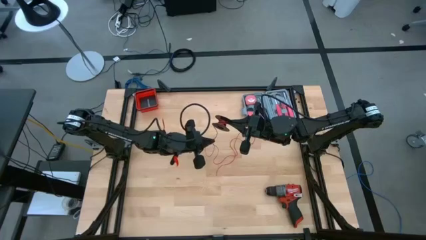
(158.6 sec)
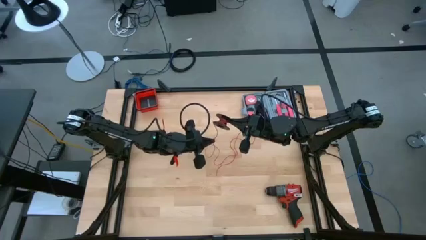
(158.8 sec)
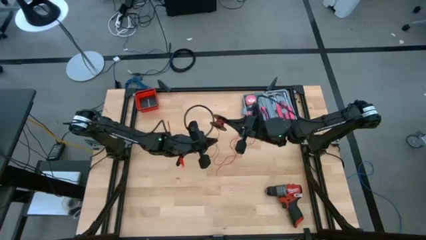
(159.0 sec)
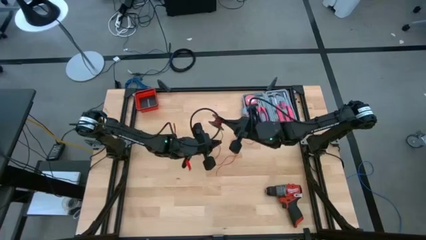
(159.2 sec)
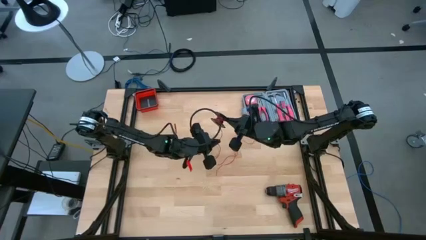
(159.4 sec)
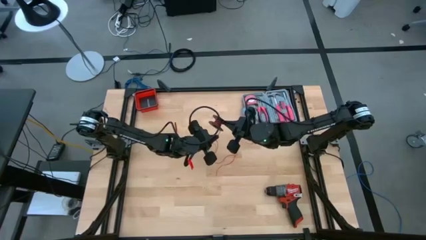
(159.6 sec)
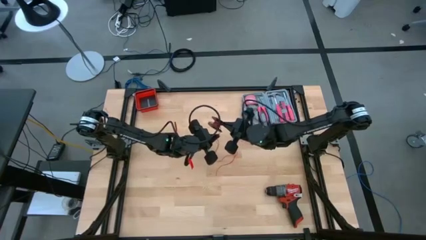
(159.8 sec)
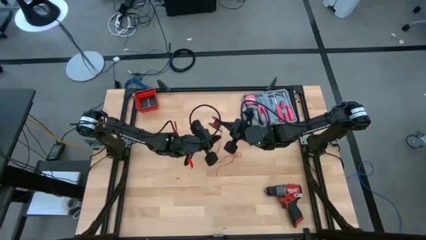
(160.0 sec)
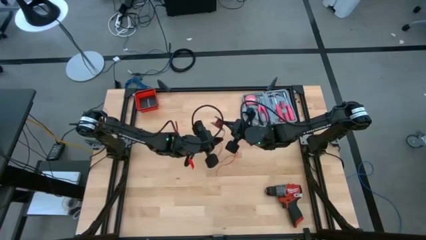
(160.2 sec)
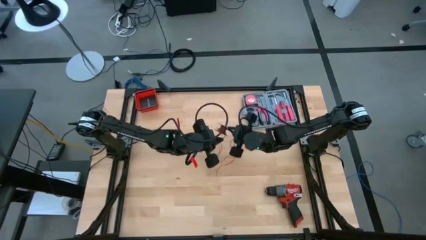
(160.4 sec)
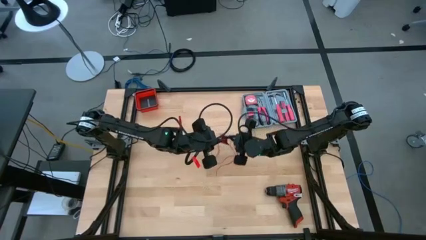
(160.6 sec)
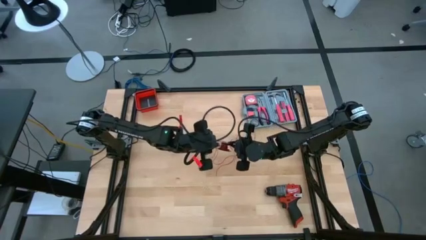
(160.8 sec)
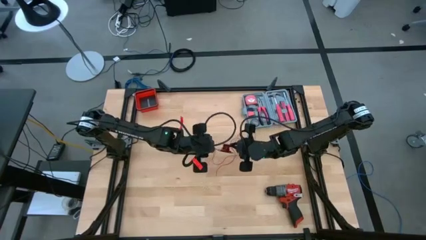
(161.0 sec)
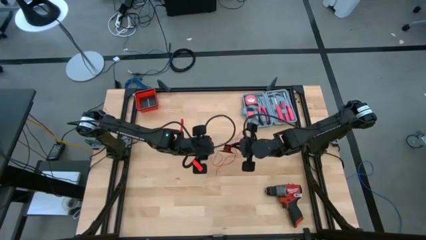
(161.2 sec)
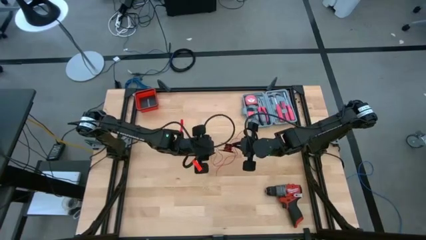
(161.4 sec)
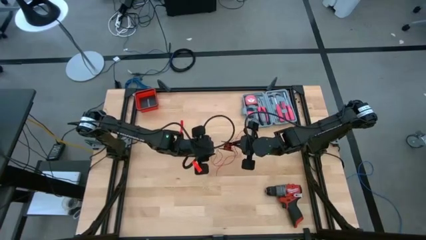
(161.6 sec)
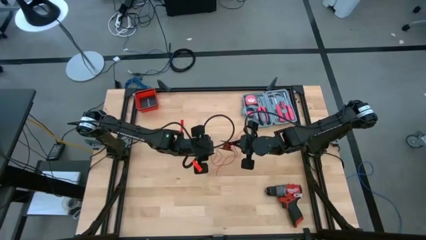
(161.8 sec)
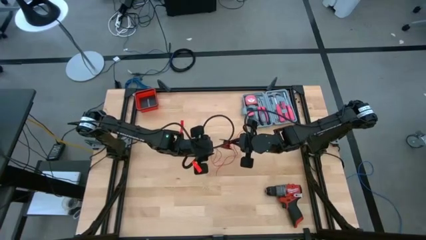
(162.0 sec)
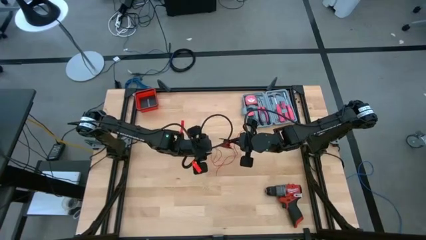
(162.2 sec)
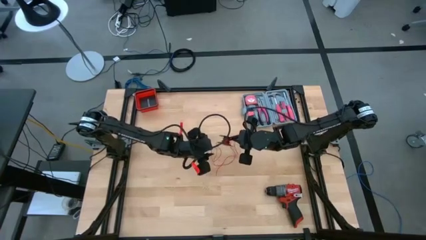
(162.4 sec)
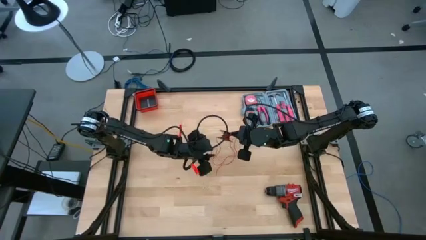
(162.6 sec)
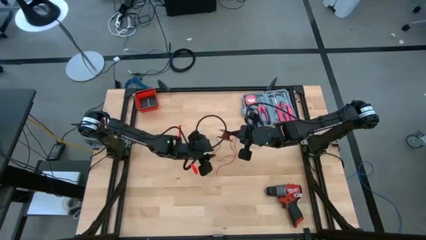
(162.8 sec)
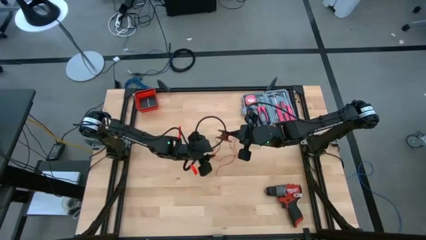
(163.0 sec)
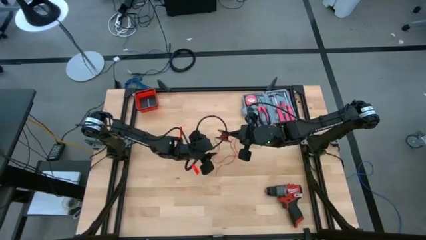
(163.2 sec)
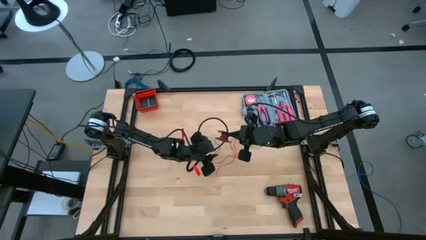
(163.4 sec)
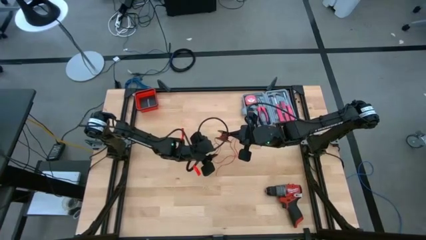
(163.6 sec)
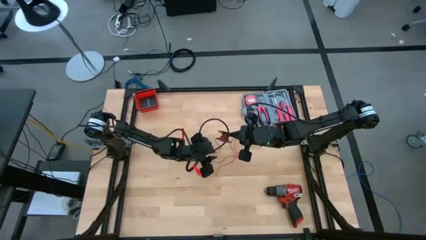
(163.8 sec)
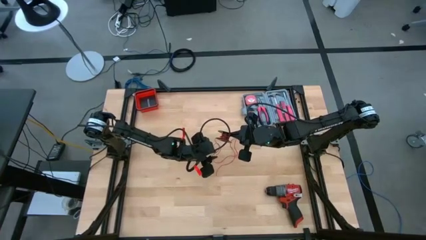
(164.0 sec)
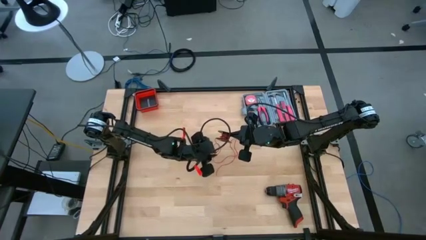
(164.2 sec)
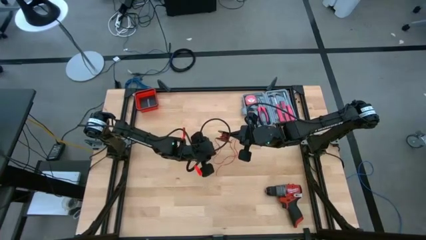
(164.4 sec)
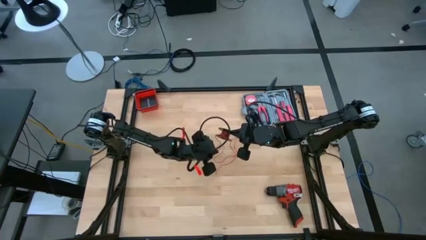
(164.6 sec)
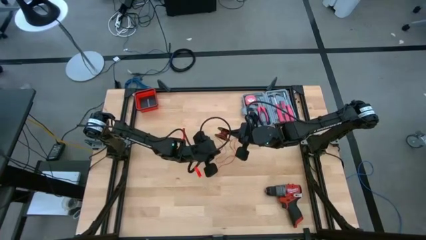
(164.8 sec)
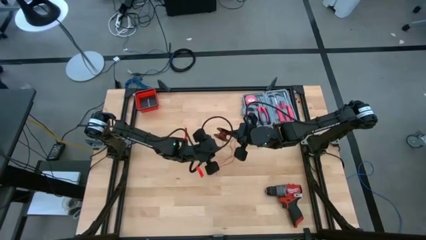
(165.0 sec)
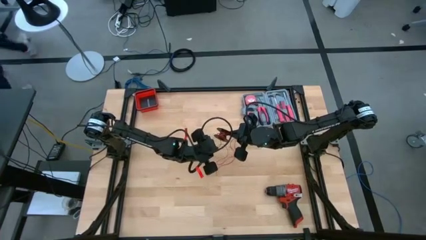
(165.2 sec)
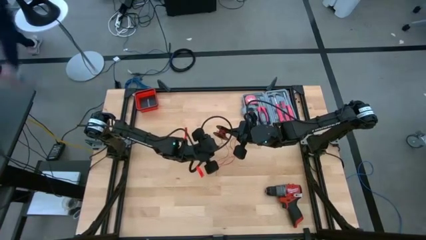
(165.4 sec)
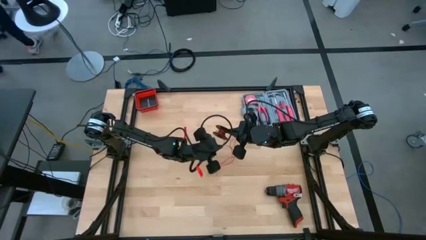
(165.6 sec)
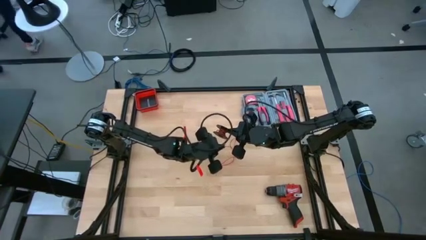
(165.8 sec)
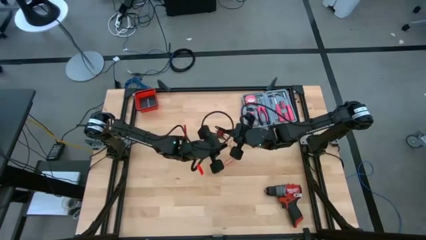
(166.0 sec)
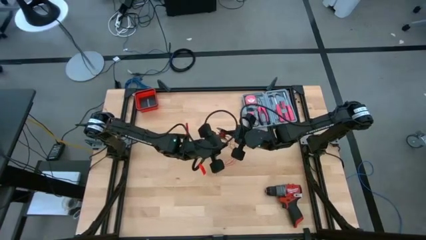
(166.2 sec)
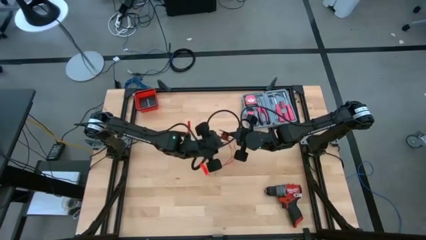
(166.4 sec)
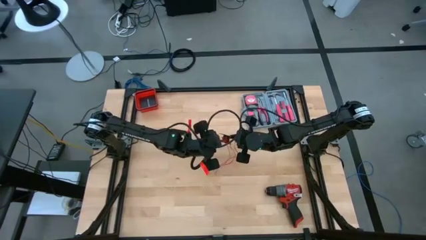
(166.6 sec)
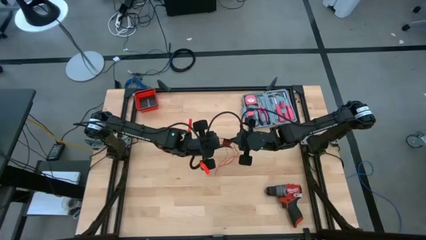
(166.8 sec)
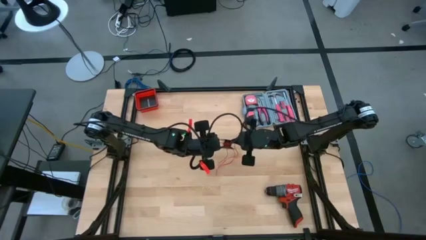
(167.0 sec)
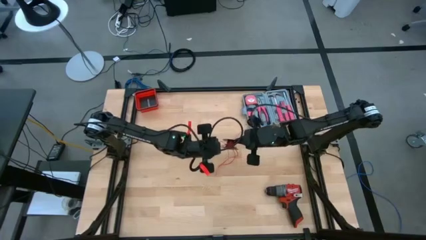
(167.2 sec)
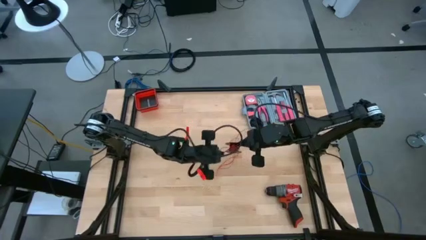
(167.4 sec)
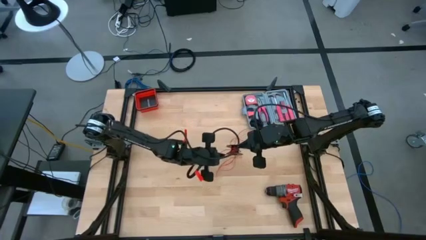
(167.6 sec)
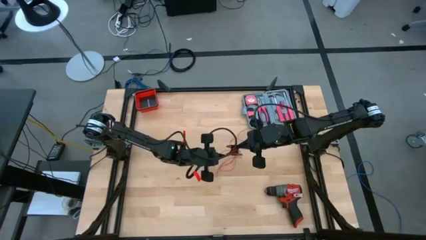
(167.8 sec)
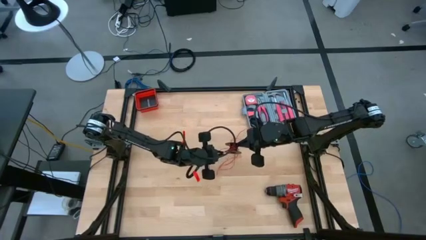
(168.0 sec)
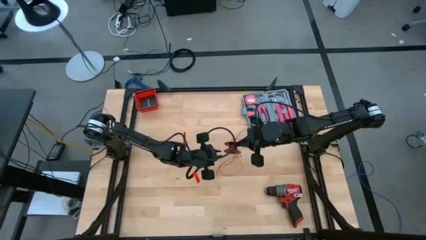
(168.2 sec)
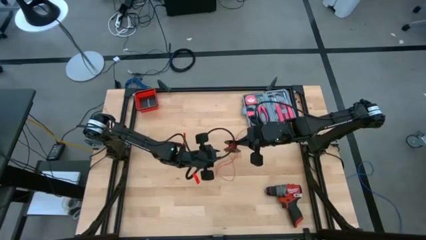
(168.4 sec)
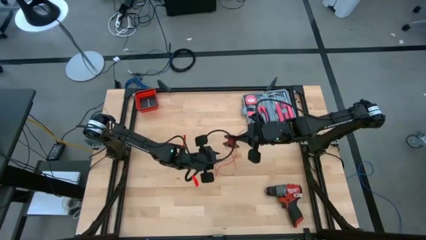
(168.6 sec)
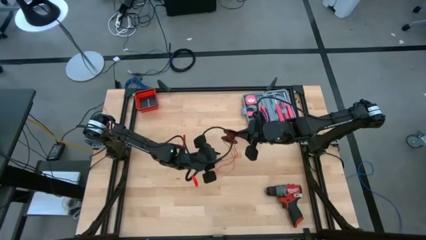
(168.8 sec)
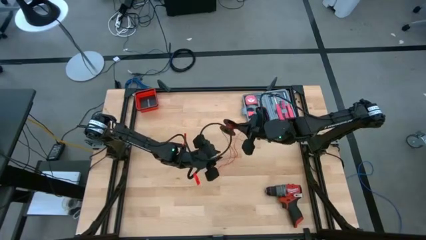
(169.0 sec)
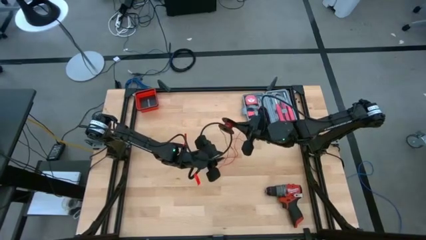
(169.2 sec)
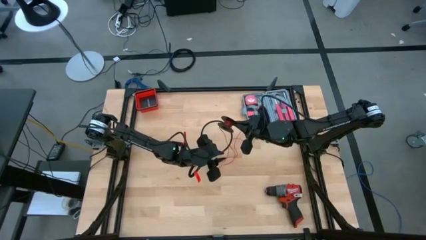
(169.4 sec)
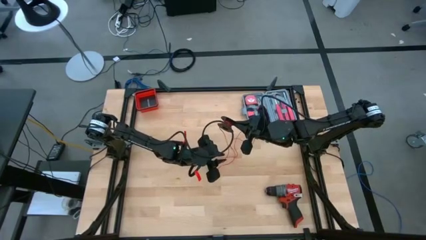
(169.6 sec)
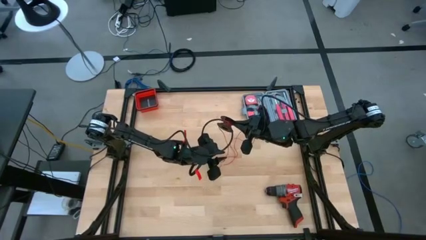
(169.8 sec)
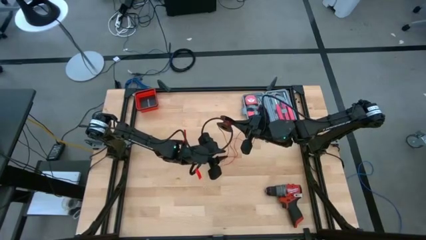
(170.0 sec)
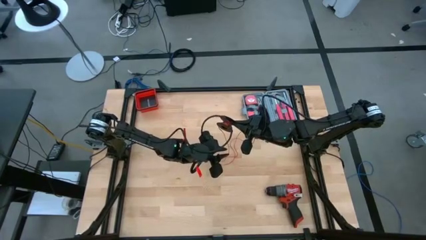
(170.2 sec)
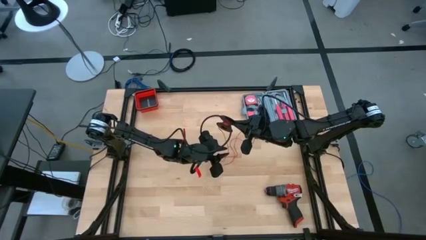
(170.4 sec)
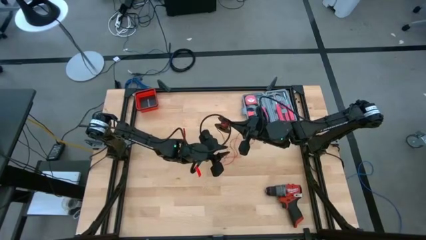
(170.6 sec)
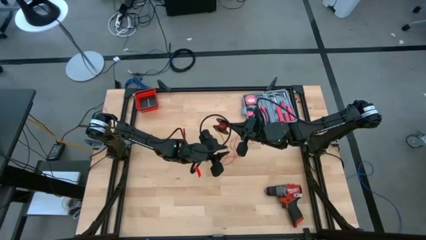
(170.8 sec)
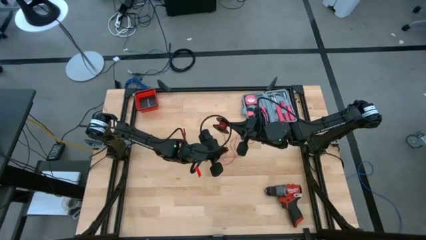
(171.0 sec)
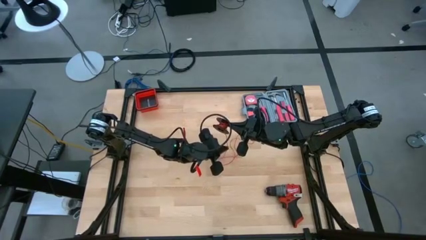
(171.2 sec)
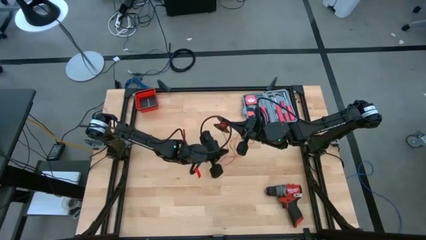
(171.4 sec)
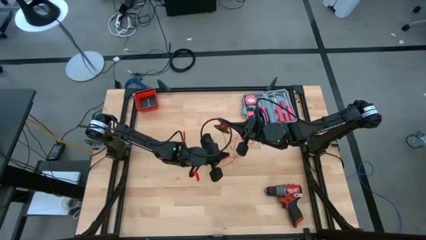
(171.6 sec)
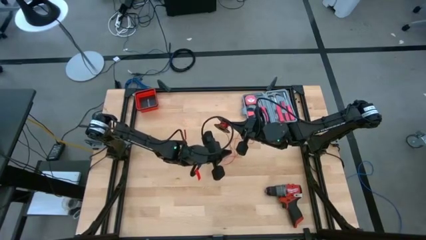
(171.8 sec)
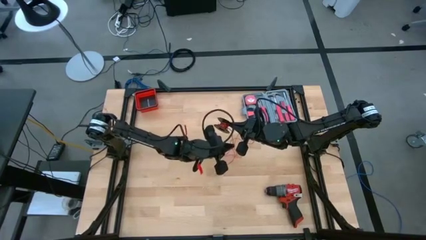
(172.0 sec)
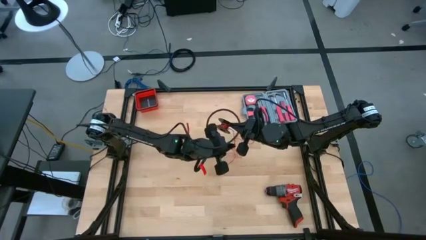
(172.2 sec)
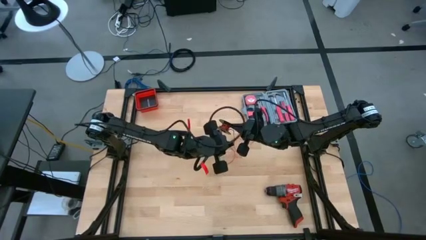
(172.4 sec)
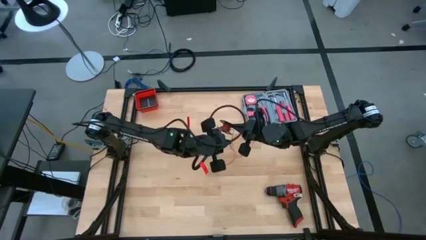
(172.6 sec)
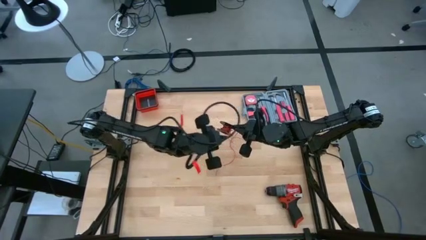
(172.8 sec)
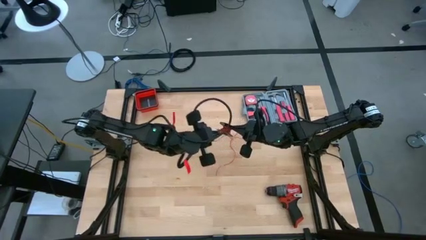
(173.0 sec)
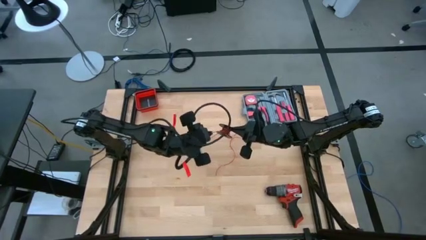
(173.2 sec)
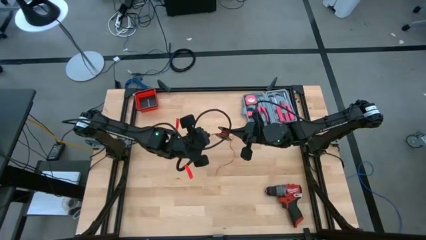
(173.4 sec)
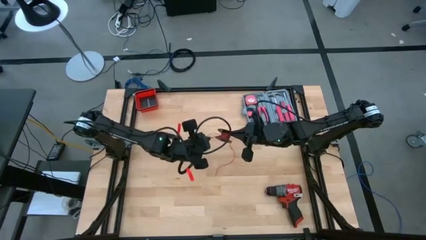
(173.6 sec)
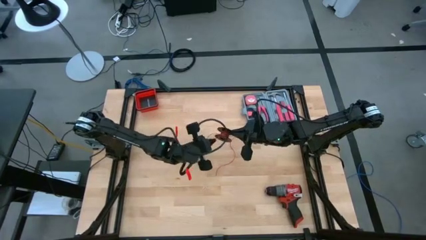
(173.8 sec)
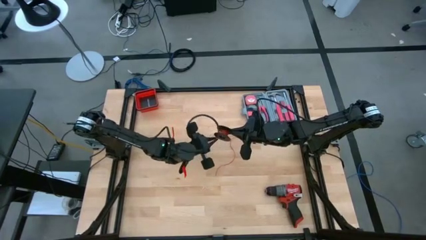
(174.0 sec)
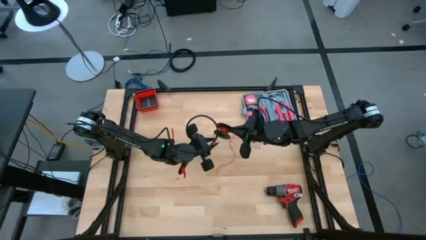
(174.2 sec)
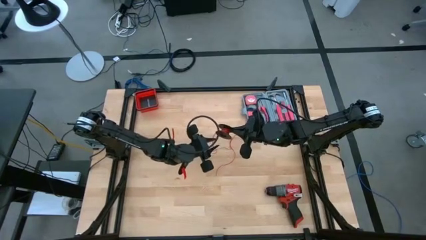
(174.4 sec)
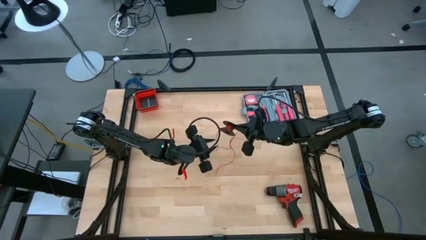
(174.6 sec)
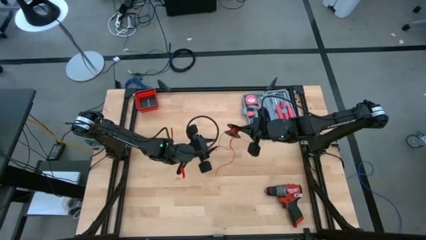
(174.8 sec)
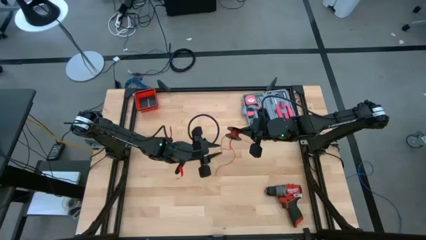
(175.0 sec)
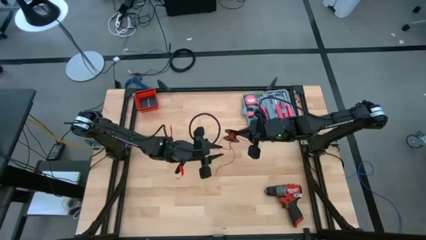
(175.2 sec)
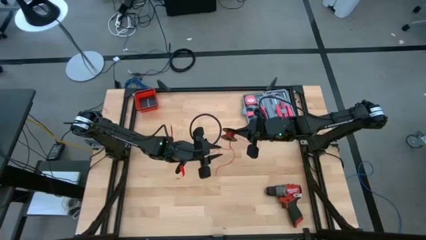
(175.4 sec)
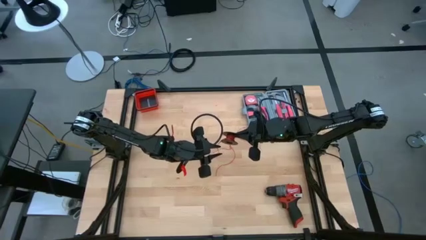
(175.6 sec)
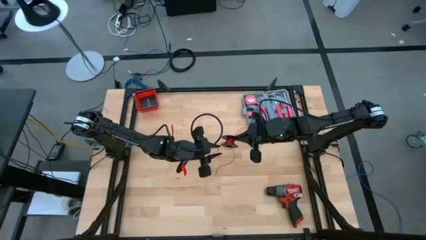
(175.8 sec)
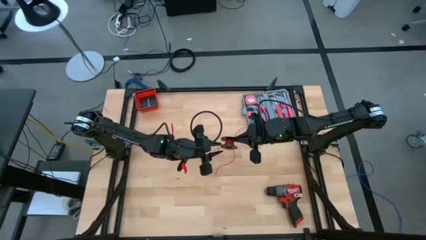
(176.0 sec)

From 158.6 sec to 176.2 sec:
Task: Coil cords
Coil the red wire onto the black spool
